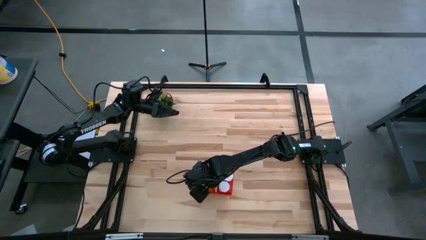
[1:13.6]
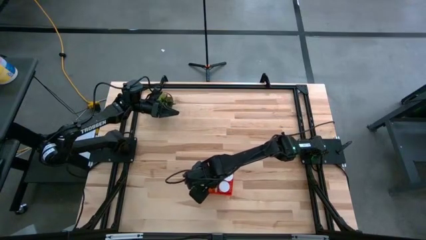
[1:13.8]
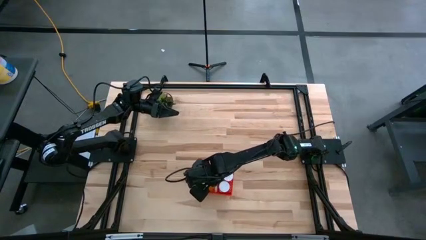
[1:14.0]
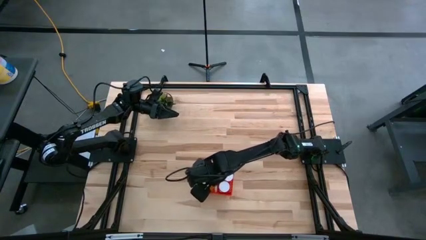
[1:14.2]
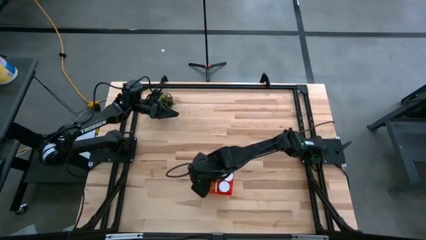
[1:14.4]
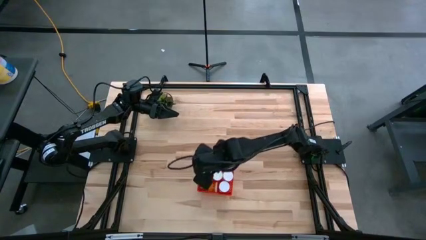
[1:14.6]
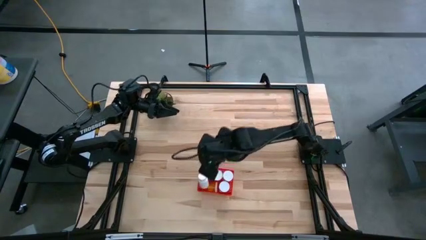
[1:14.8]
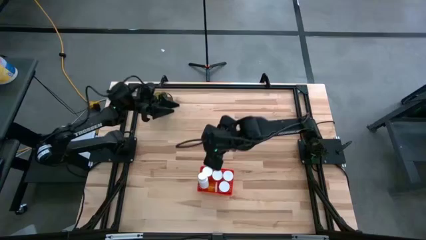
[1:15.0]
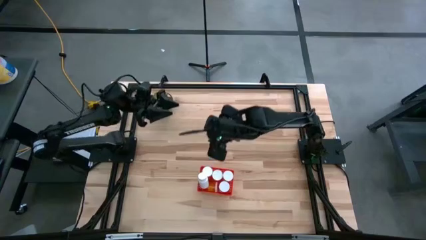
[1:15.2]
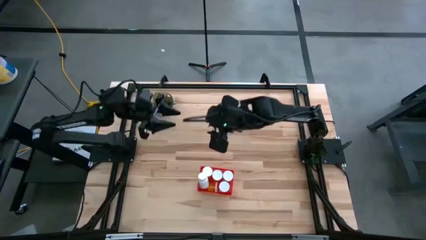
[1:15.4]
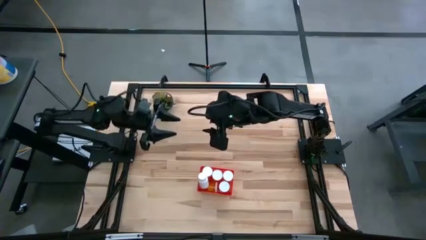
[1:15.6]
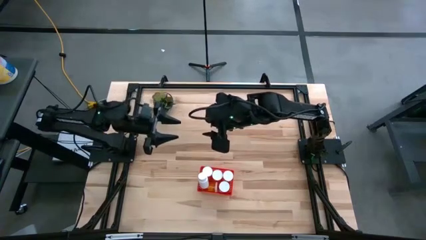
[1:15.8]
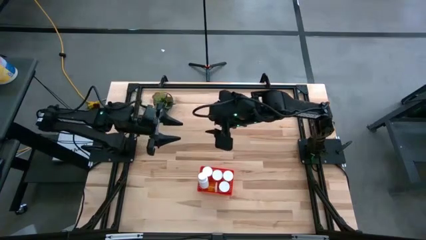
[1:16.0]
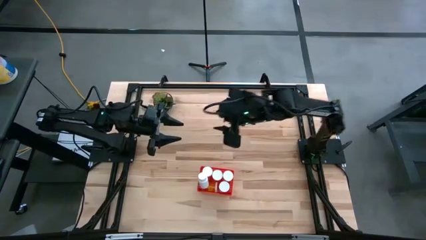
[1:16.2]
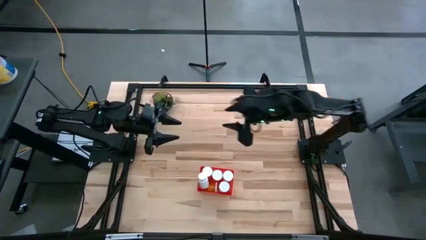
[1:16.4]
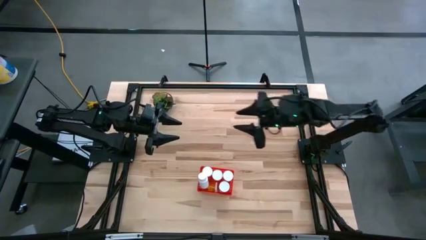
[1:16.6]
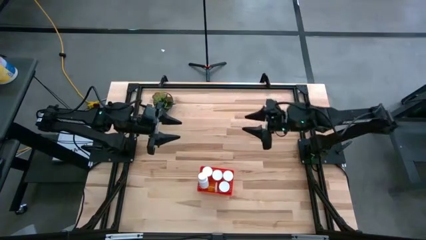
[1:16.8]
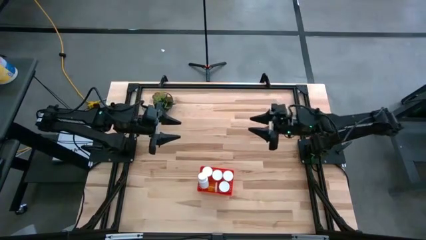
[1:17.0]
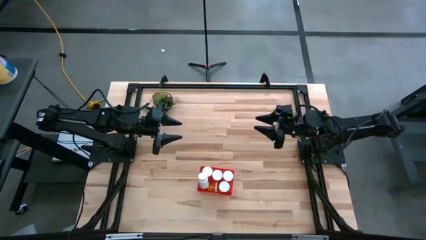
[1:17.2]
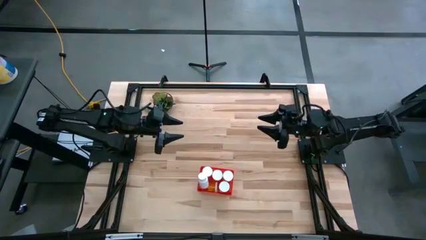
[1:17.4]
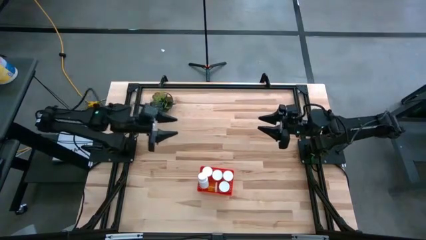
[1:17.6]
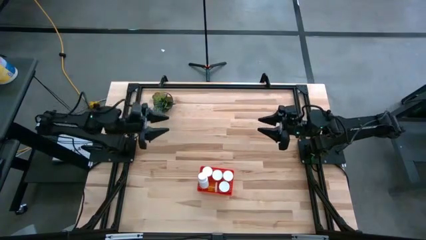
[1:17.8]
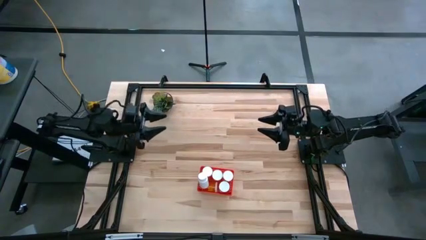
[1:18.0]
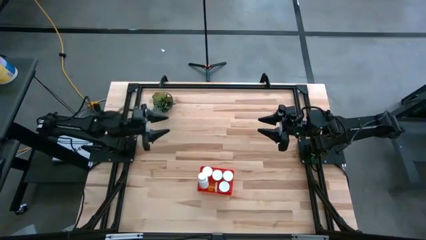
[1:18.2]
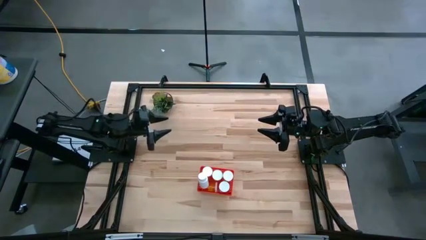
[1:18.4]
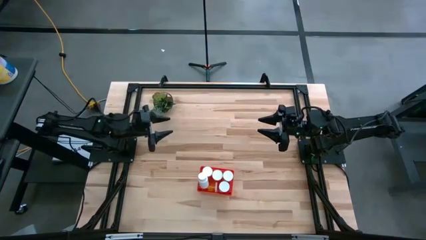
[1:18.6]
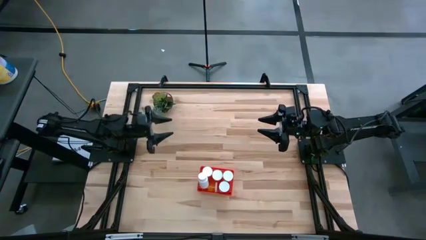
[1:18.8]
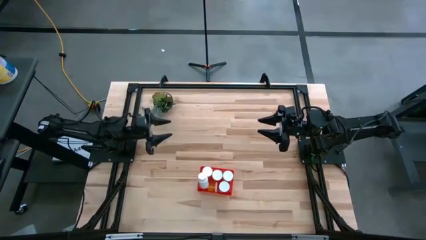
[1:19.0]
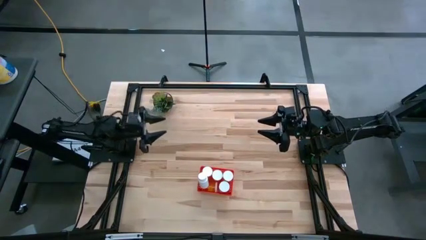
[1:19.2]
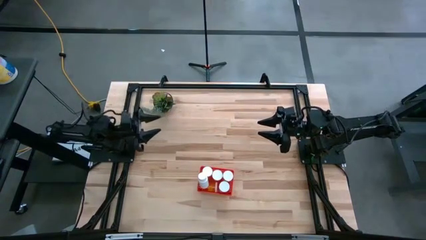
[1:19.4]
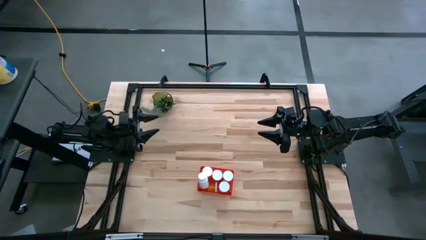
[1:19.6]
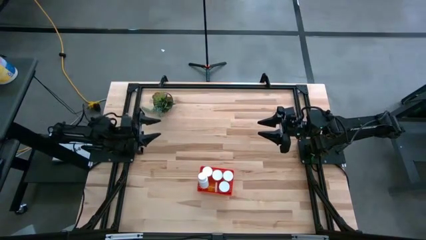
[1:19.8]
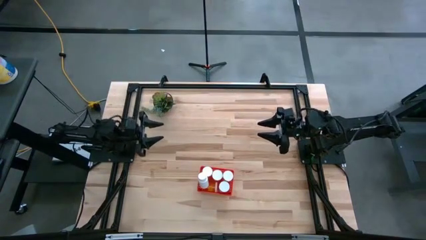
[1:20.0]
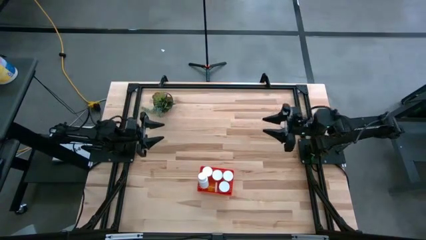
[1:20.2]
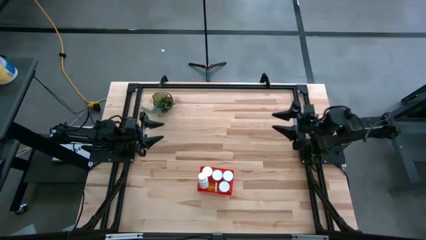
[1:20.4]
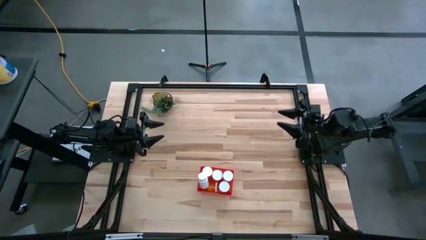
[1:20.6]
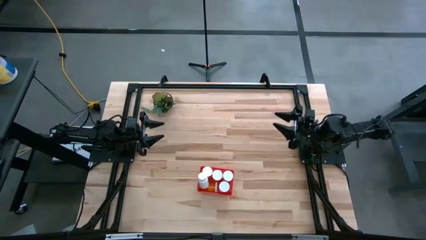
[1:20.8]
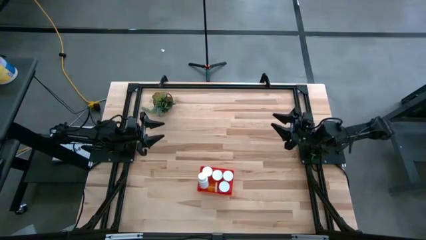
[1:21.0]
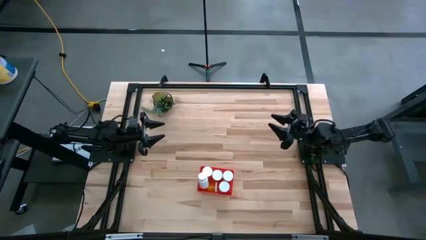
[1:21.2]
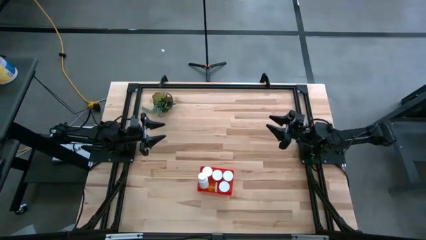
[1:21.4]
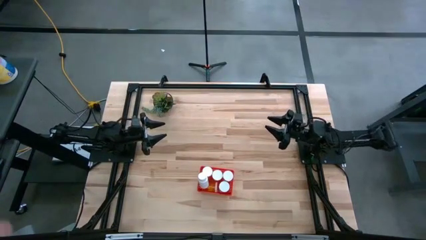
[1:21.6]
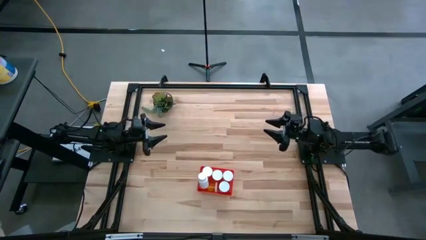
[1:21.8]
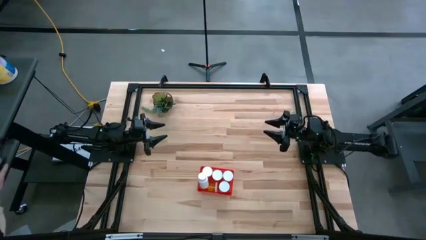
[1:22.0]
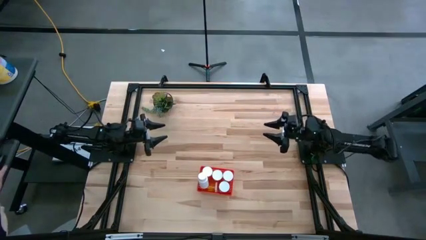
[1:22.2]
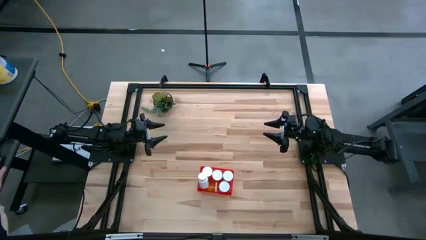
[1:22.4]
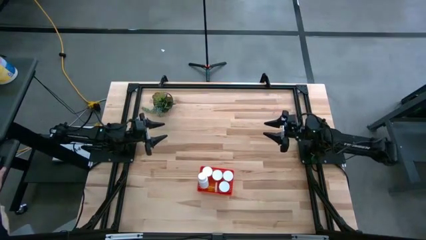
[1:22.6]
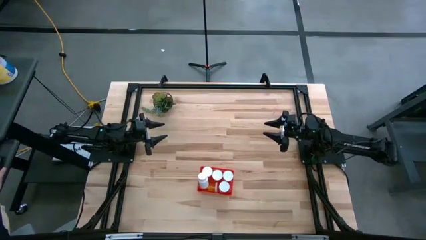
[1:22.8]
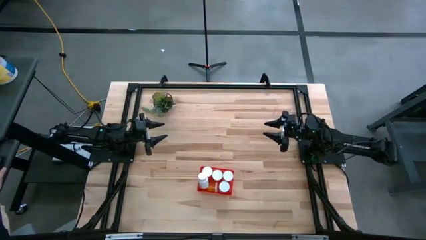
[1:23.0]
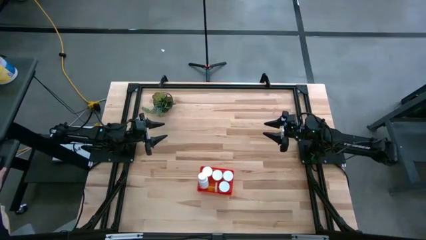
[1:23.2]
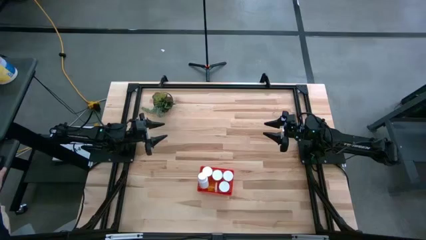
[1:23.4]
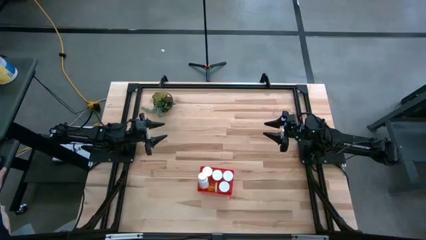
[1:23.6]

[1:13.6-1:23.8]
Task: Pick and place pill bottles into a basket
Return to Home Position

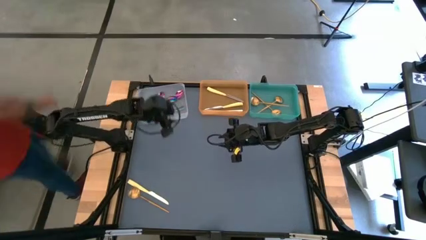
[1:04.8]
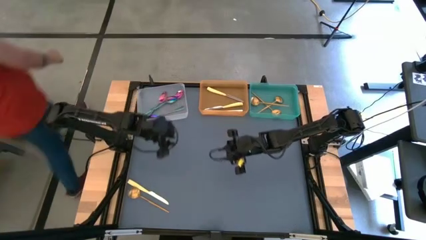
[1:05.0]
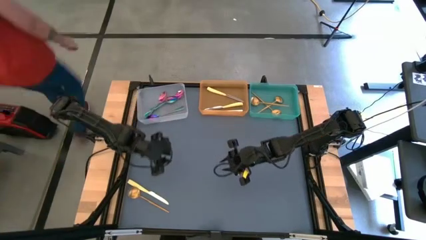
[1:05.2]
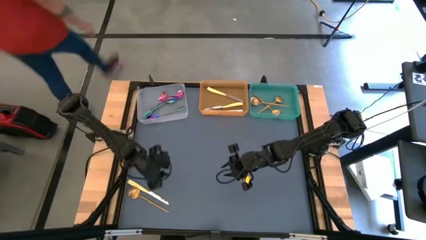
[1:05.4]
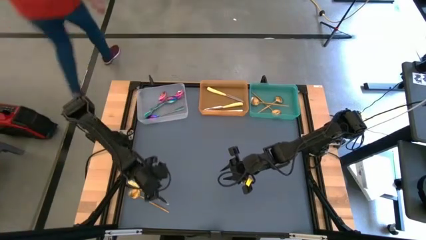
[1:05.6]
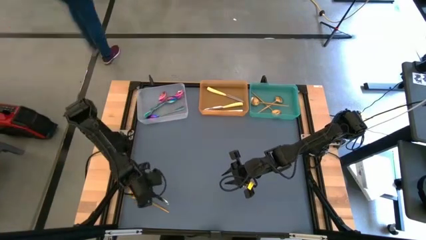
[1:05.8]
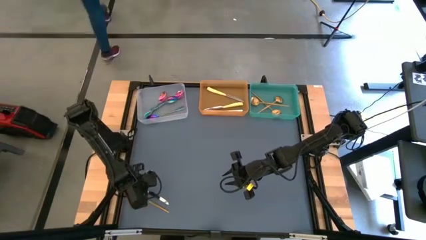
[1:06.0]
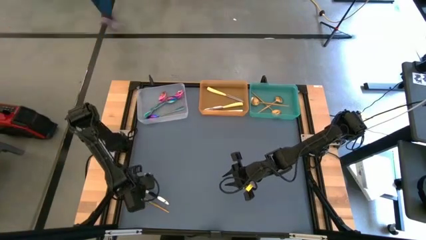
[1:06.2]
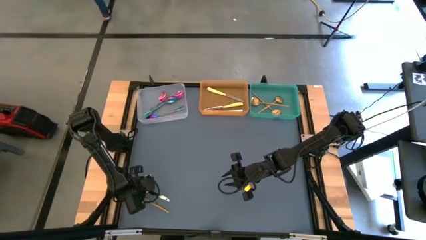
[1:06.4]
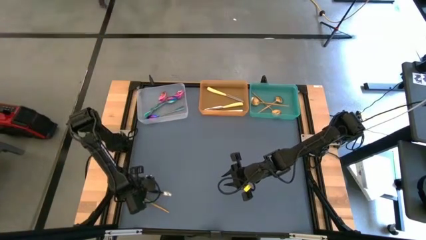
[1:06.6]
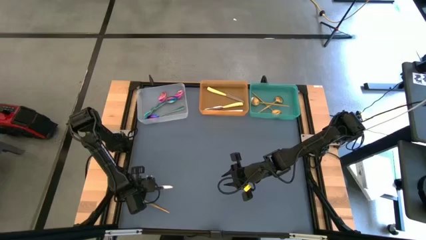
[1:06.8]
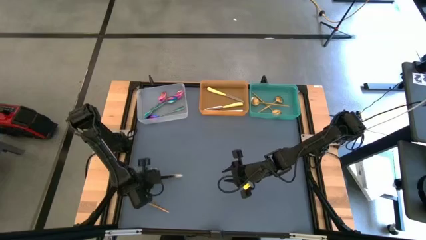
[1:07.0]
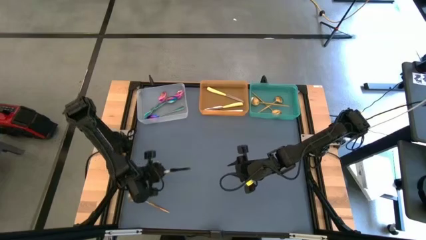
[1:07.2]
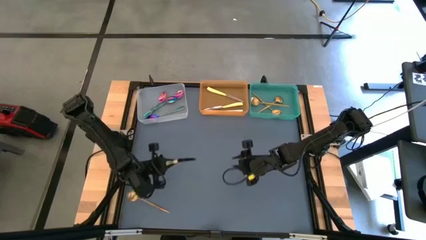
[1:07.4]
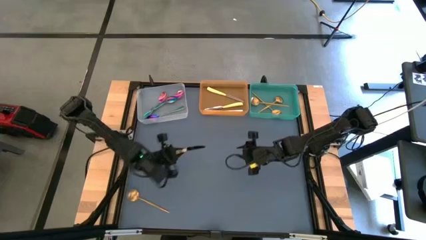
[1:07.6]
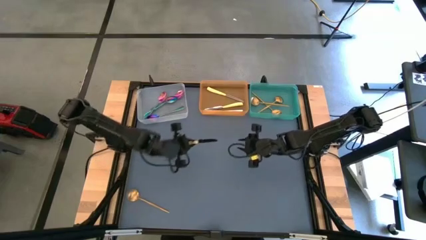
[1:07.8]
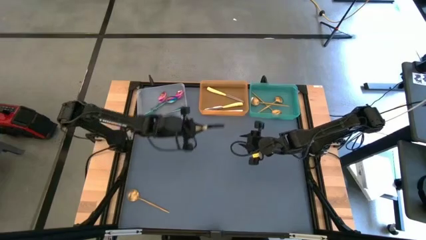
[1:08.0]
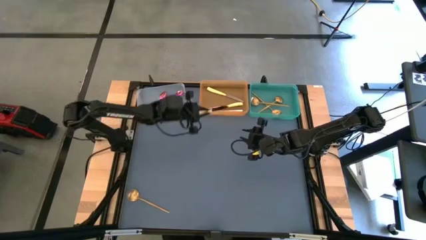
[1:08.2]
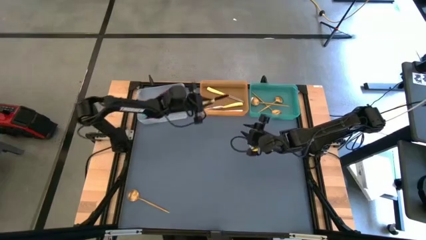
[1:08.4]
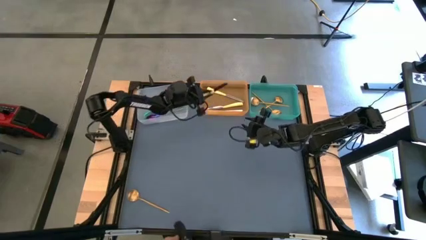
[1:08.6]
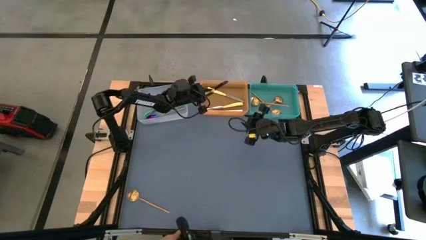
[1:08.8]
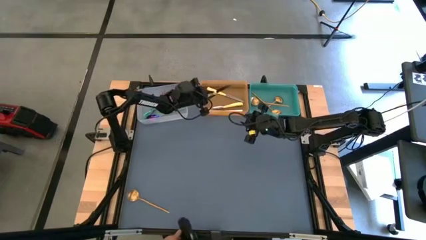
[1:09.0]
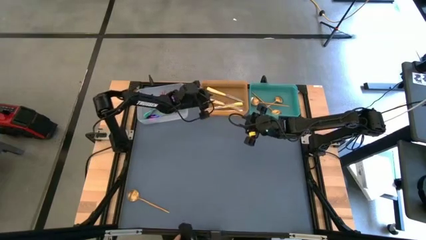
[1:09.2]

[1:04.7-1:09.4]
Task: Sort silverware by color (type)
Put the yellow table knife into the orange bin
